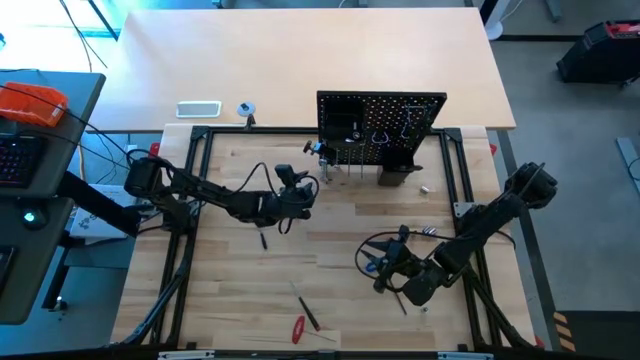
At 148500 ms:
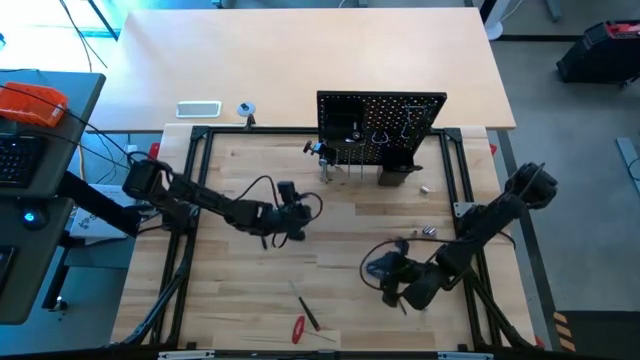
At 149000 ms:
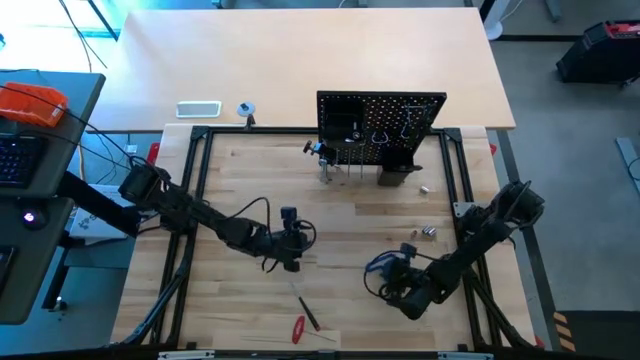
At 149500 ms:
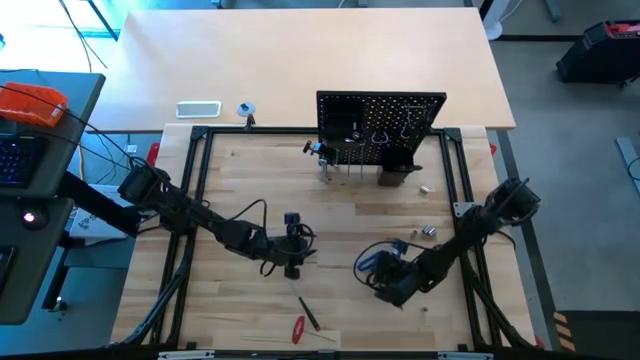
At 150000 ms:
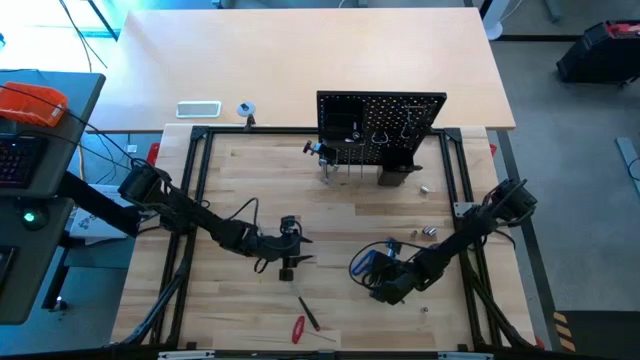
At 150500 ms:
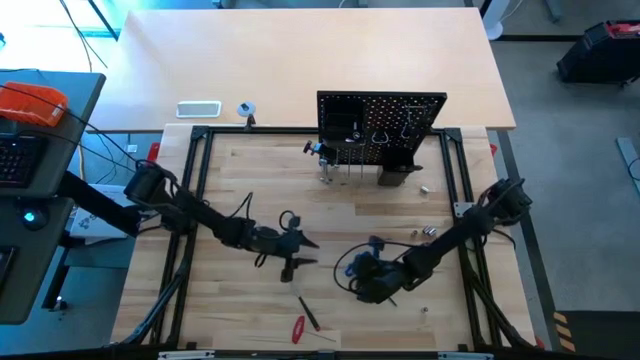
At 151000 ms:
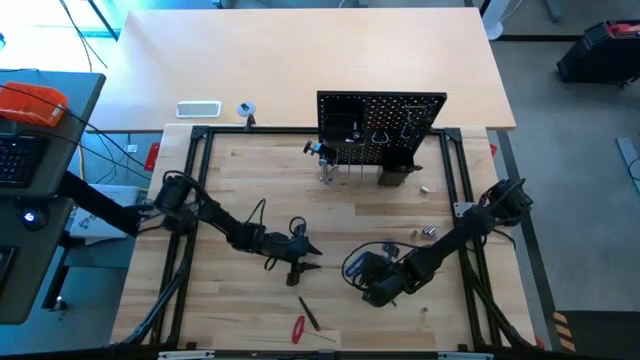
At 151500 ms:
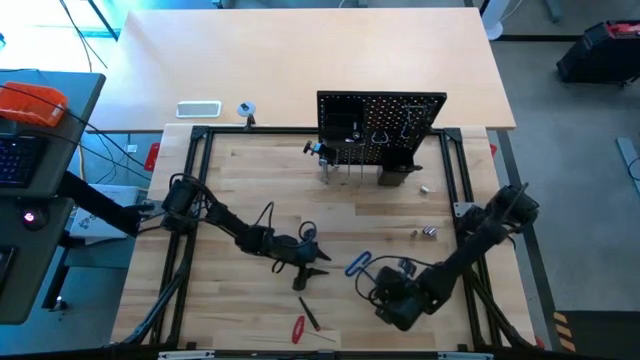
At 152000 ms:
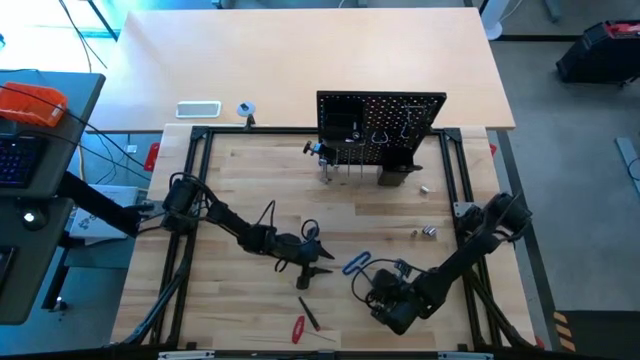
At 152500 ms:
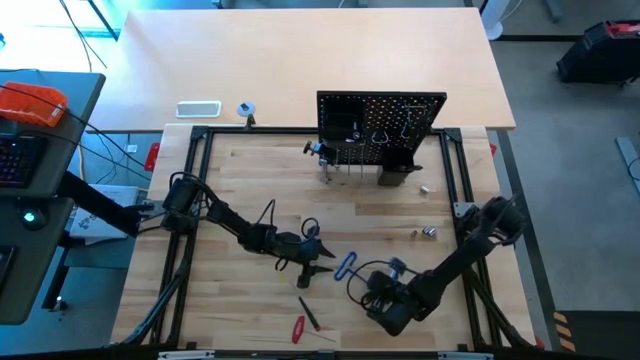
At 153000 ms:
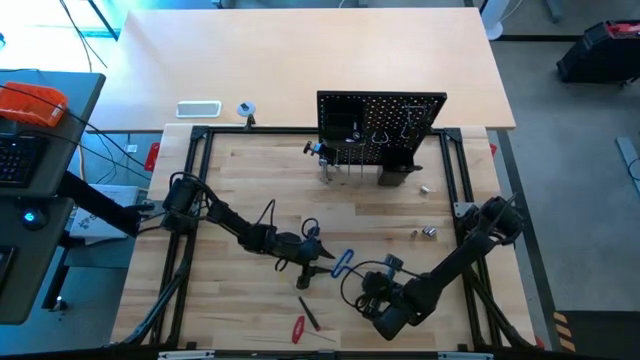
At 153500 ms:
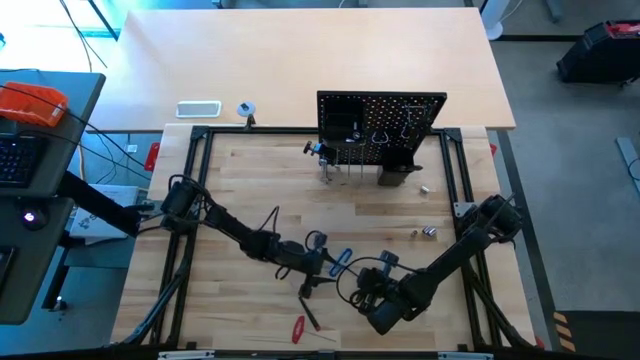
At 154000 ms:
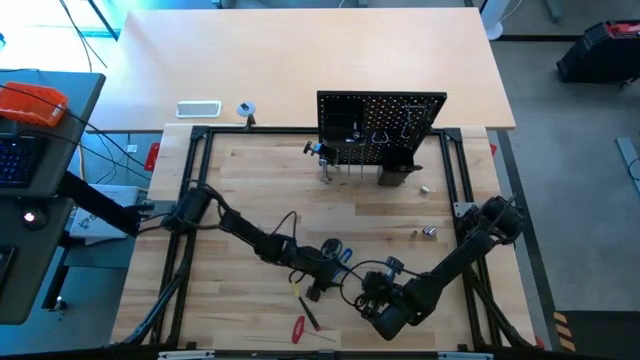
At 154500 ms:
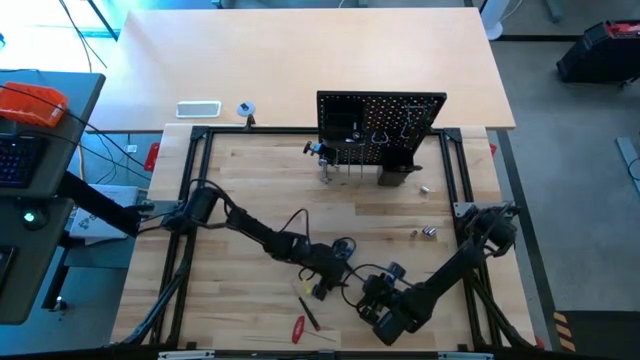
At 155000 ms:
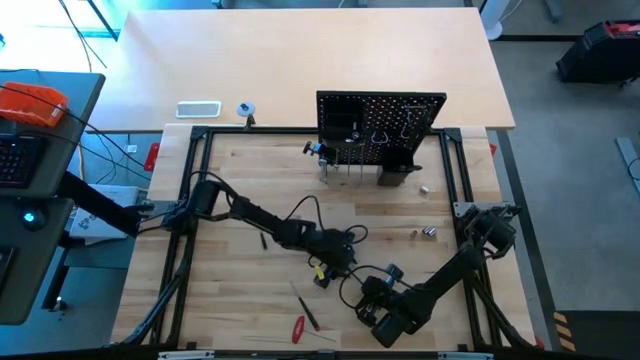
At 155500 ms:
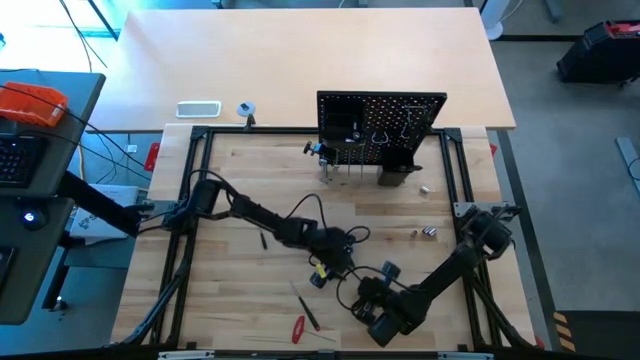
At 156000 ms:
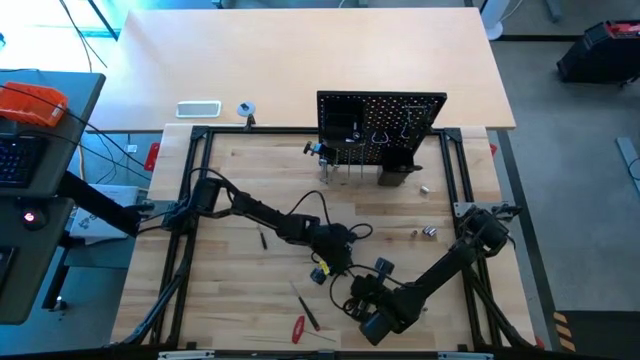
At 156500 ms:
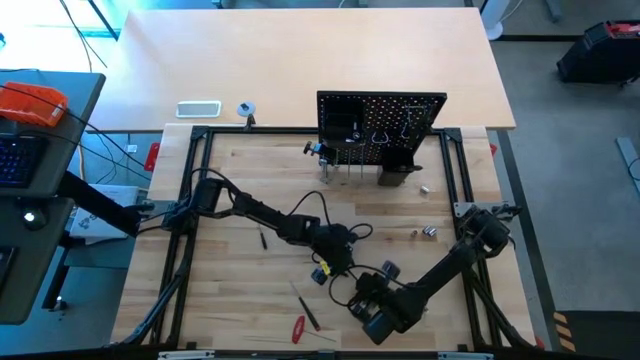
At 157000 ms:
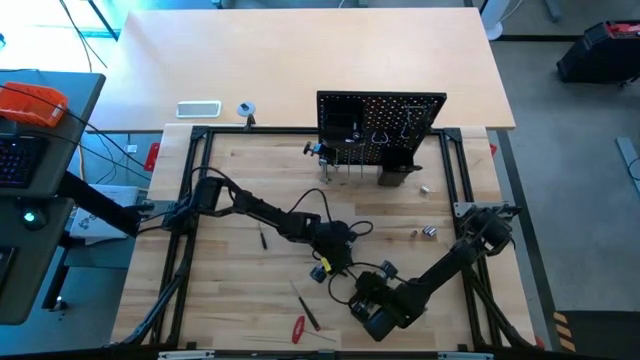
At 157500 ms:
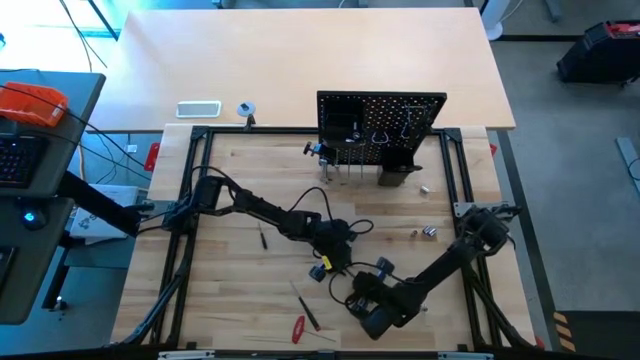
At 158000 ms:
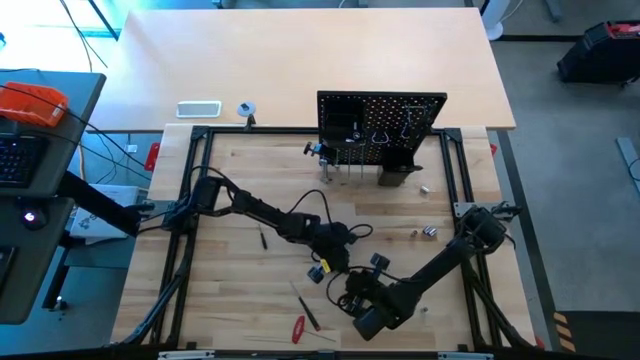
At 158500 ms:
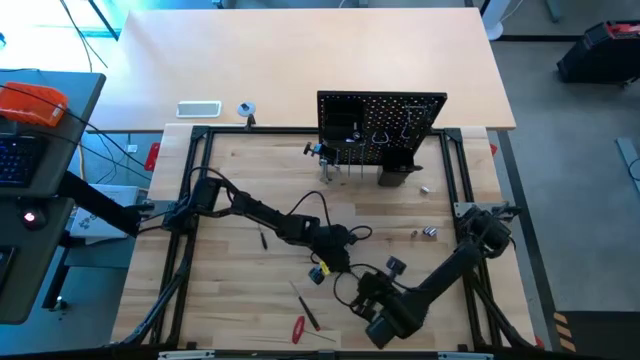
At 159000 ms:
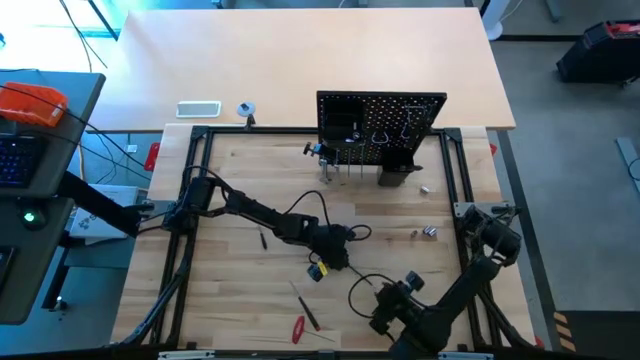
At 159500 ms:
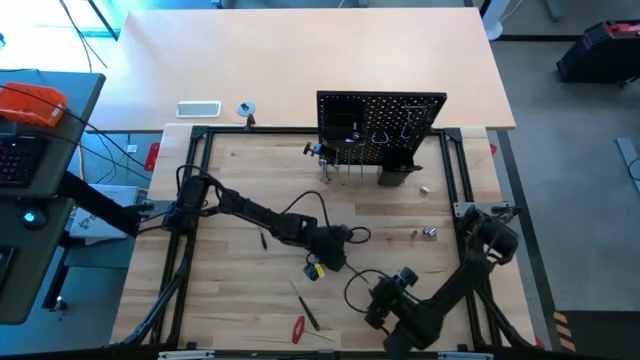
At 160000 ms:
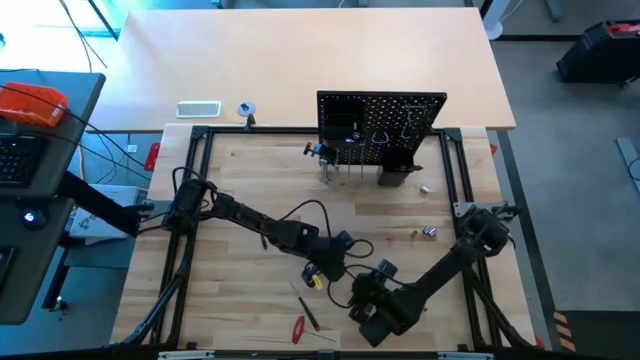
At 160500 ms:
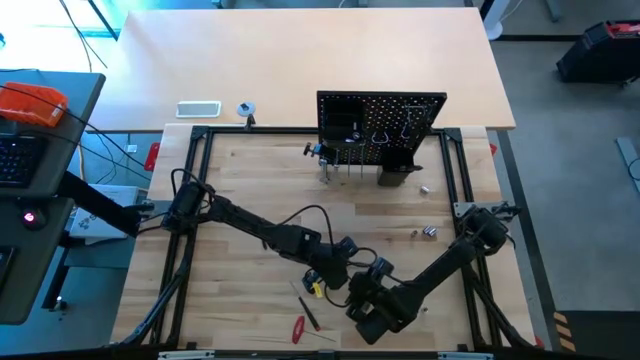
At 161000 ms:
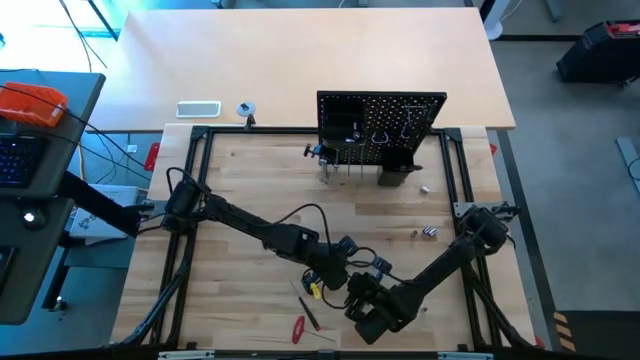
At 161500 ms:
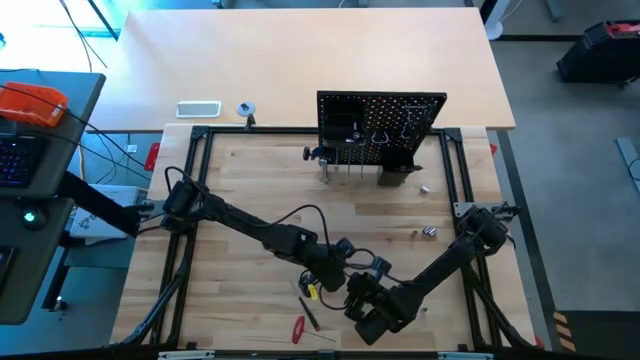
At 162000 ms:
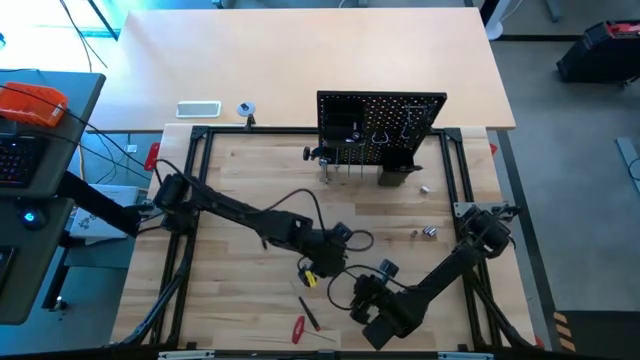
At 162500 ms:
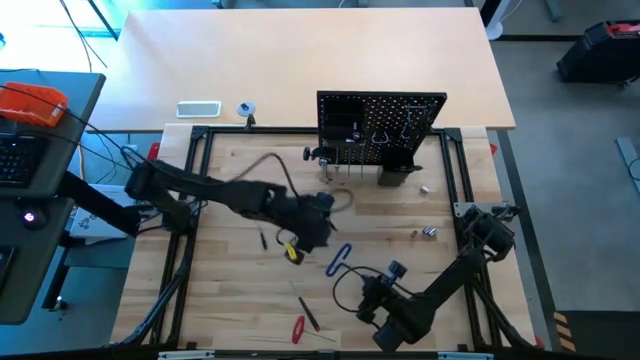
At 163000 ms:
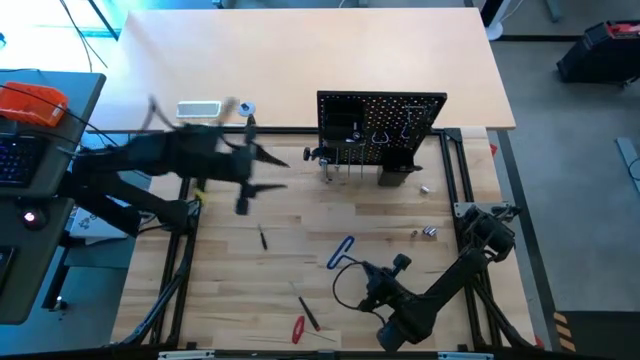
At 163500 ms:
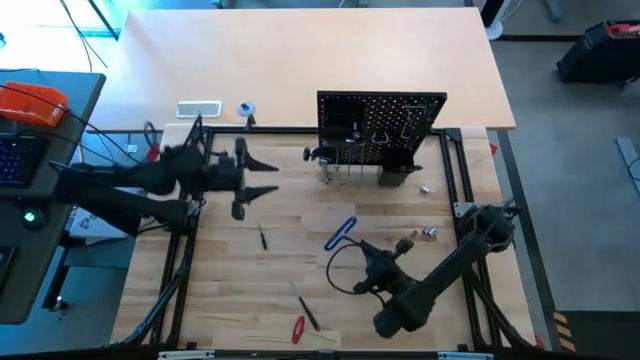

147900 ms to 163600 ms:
Task: Hang tools onto peg board
Hang the blue L-shaped hex key onto the pegboard

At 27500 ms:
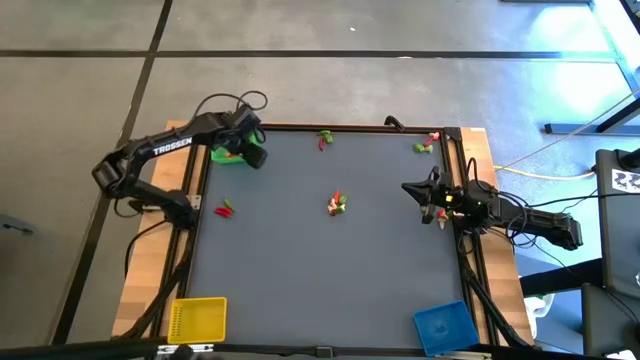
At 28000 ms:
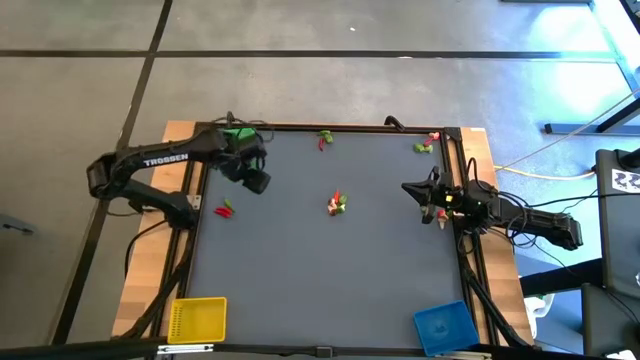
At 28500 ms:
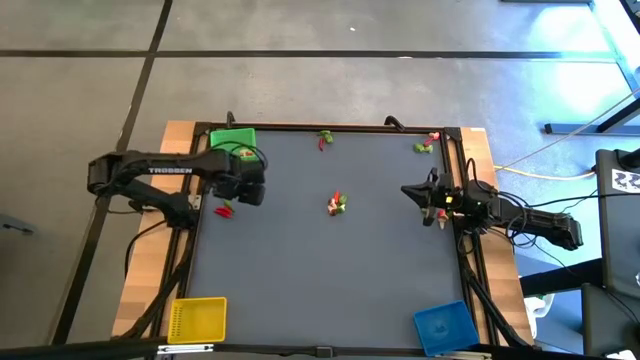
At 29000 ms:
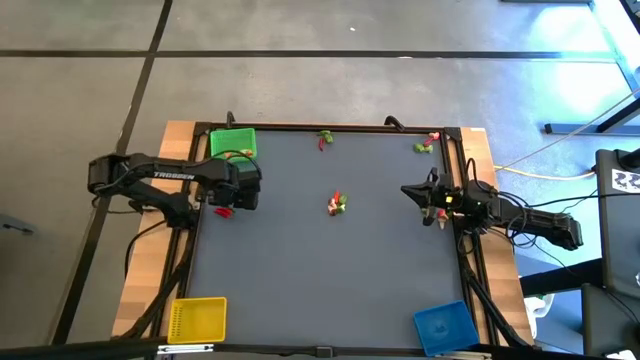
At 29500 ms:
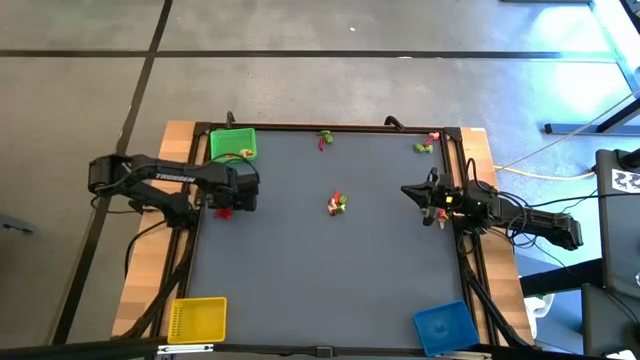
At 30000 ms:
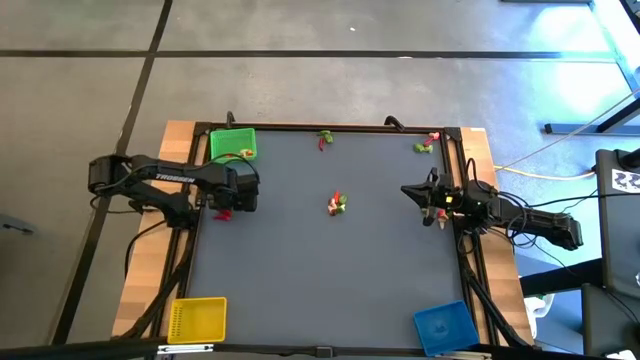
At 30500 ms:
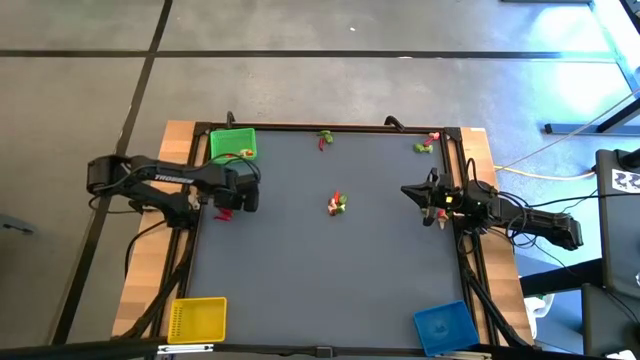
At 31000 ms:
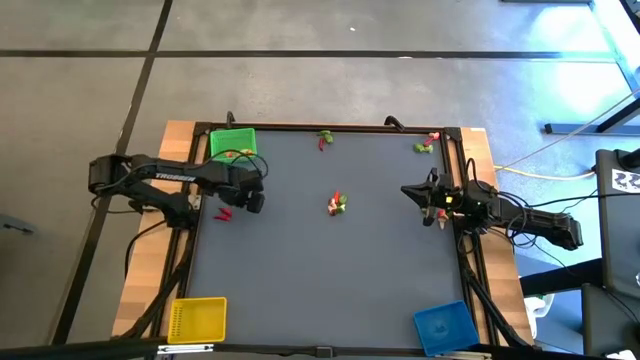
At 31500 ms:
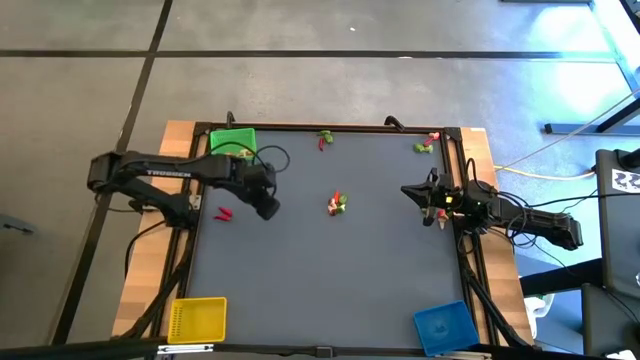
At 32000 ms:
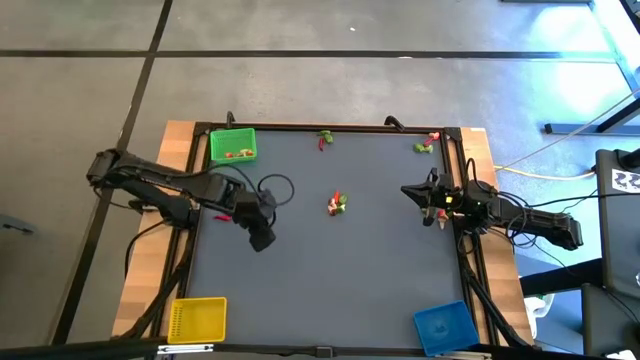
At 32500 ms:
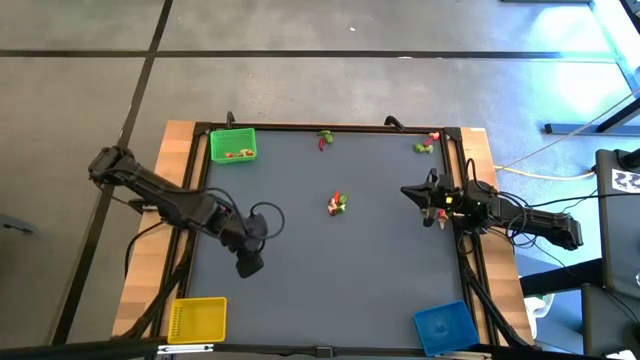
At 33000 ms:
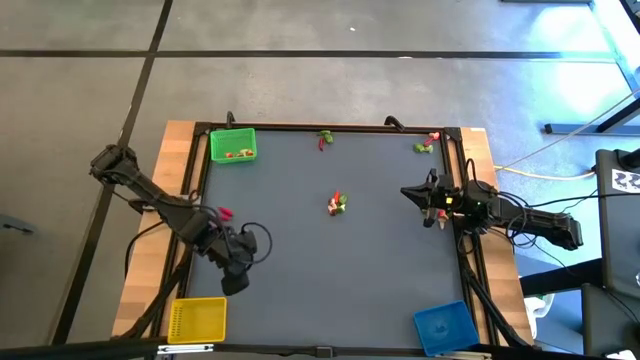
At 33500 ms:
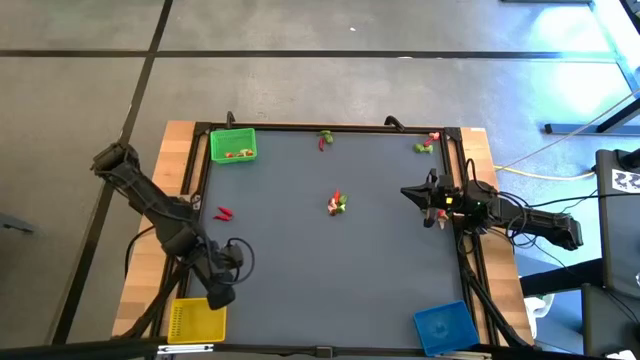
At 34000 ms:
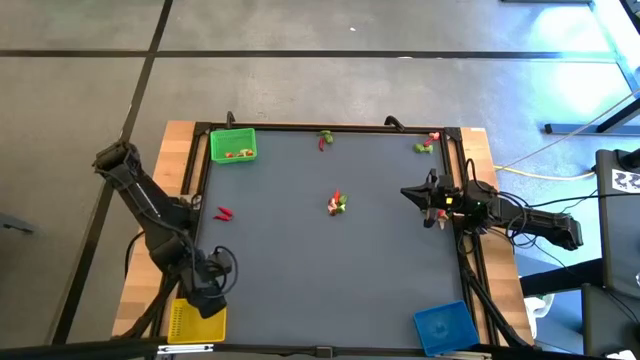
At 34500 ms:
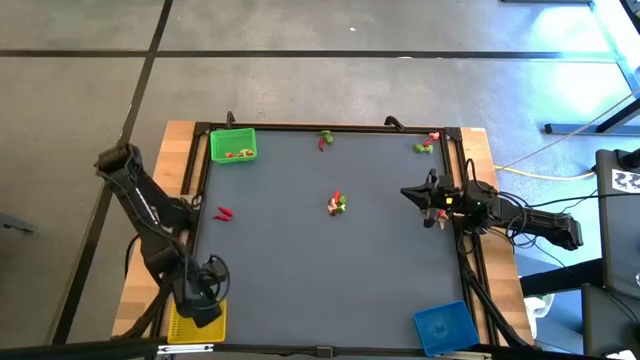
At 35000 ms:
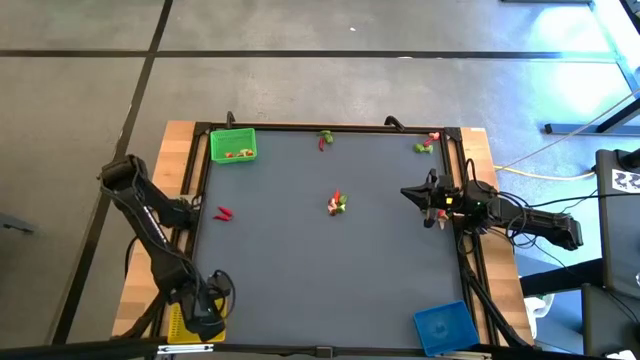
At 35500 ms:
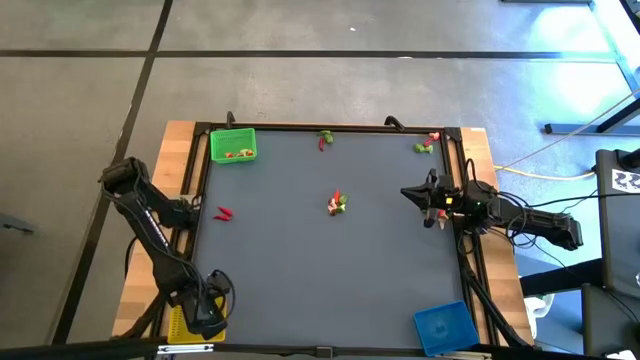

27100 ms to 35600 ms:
Task: Sort produce into baskets
Put the green chili pepper into the yellow bin
